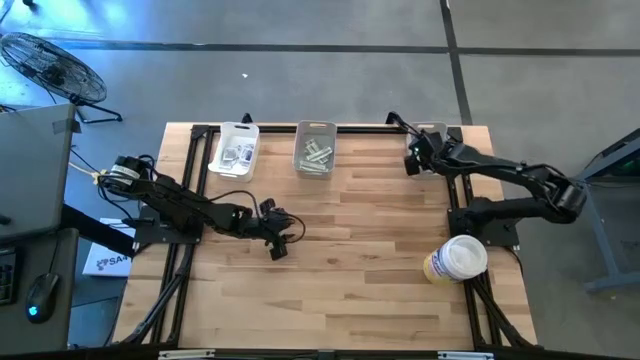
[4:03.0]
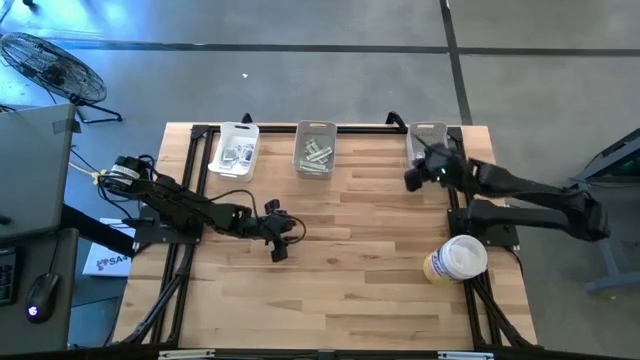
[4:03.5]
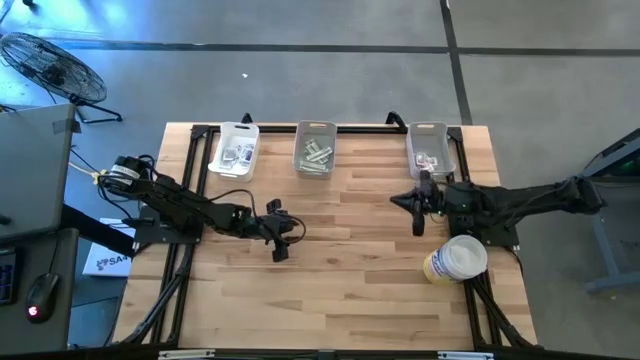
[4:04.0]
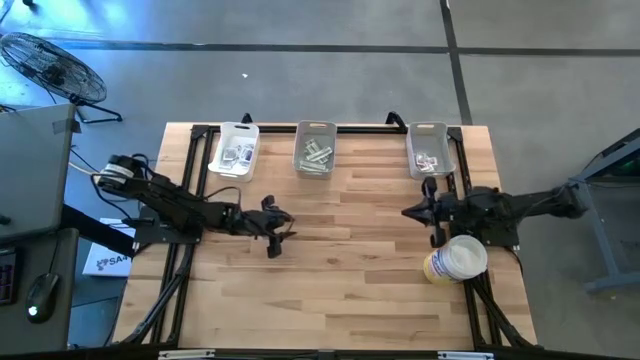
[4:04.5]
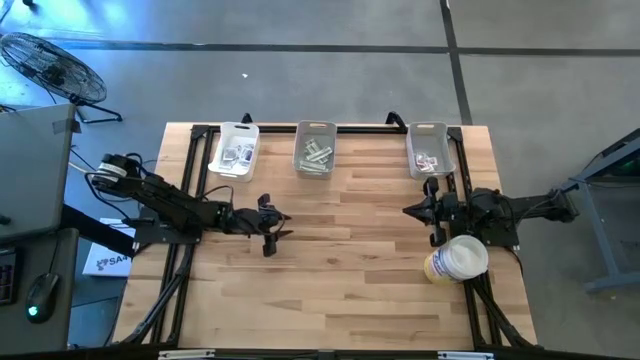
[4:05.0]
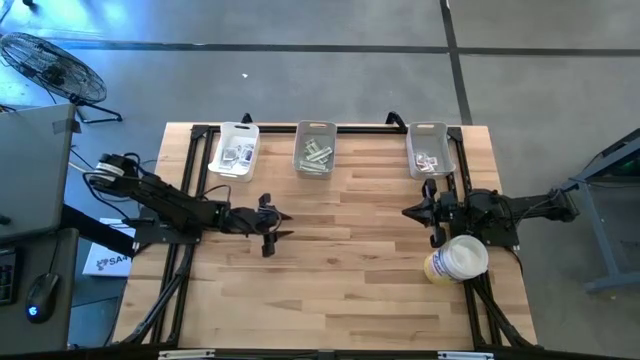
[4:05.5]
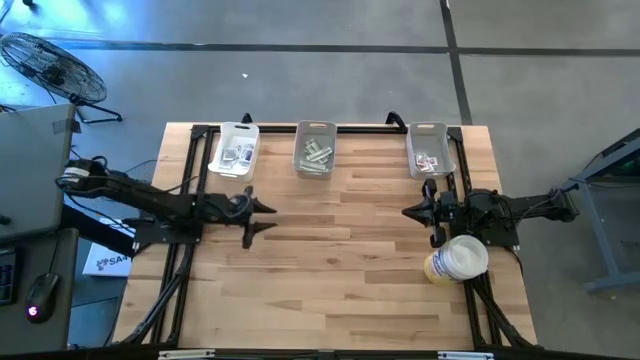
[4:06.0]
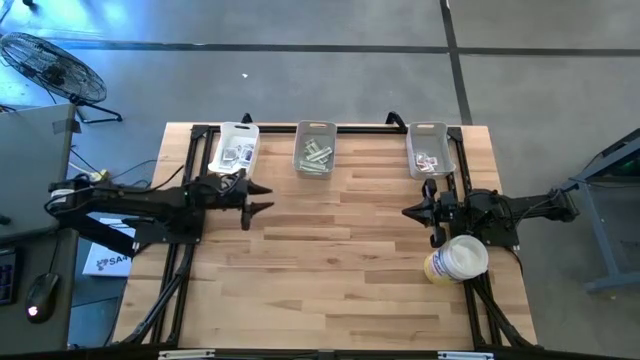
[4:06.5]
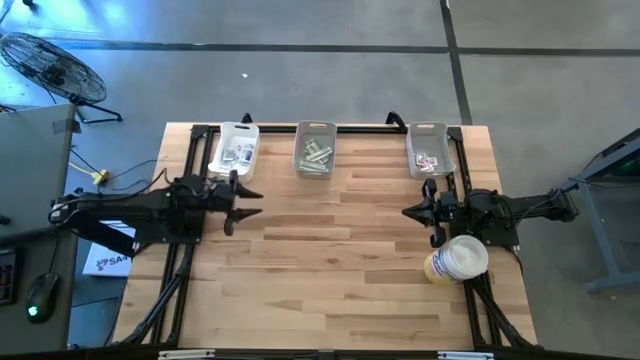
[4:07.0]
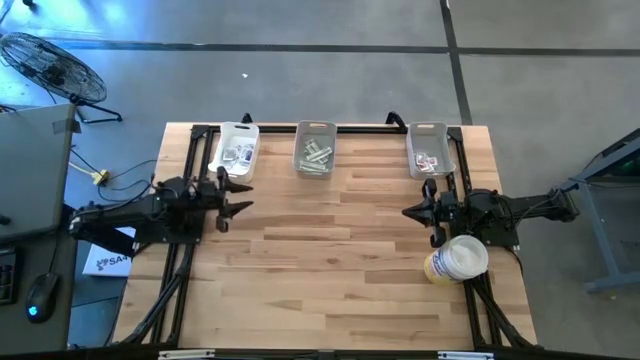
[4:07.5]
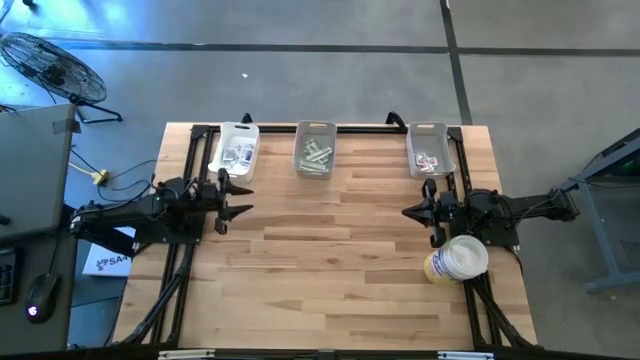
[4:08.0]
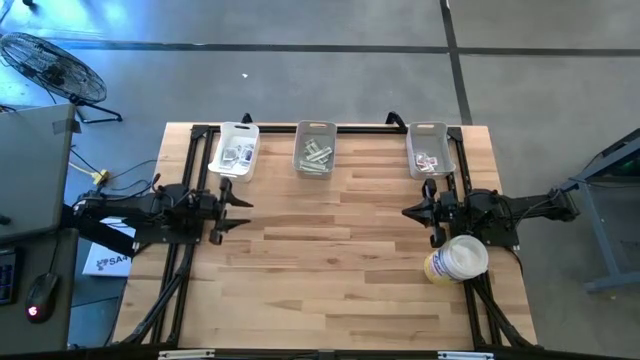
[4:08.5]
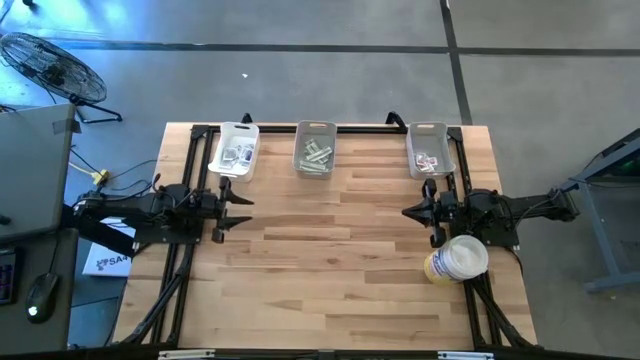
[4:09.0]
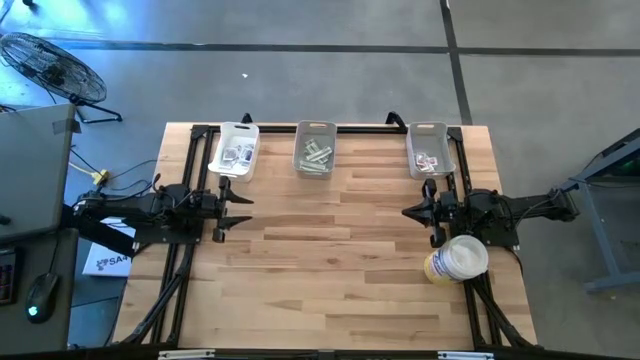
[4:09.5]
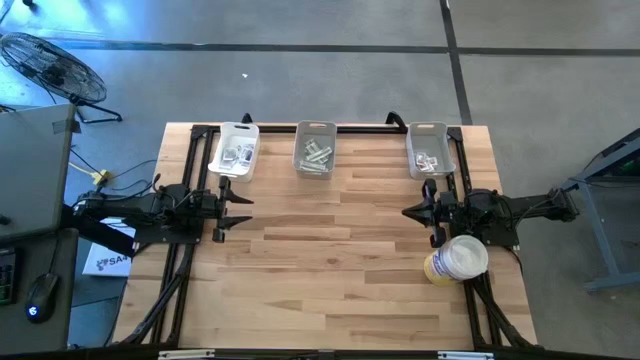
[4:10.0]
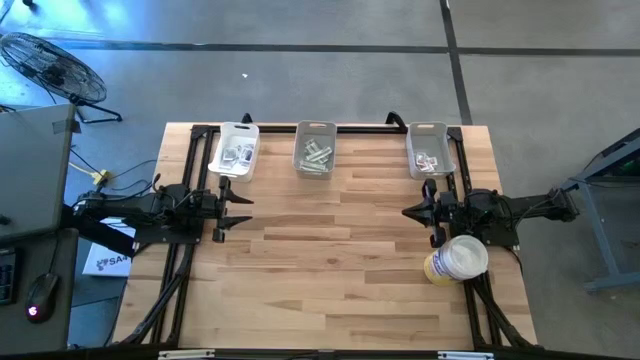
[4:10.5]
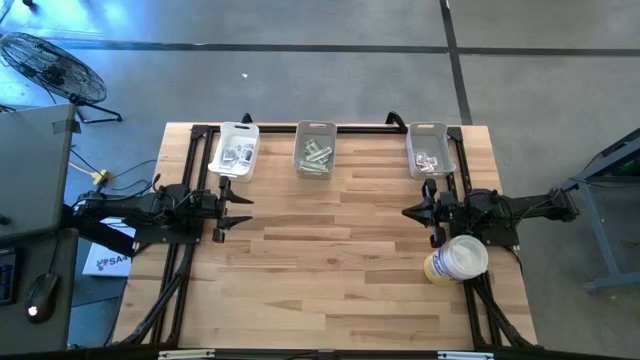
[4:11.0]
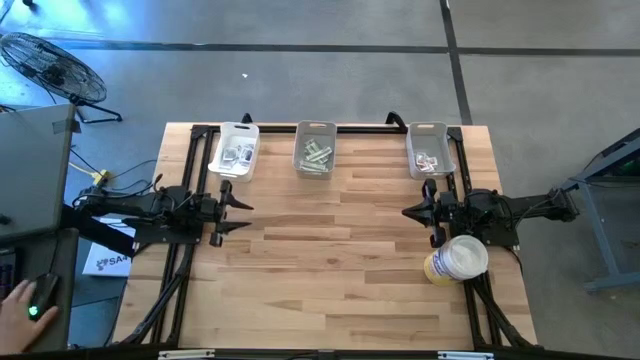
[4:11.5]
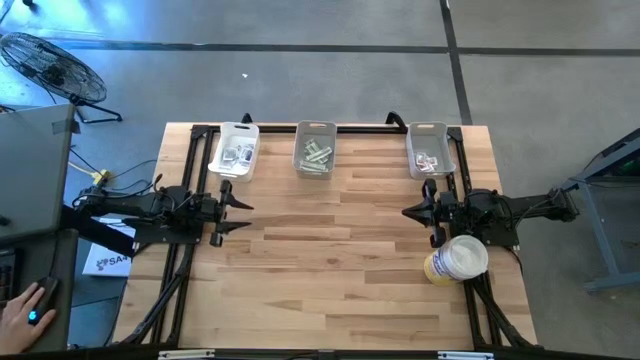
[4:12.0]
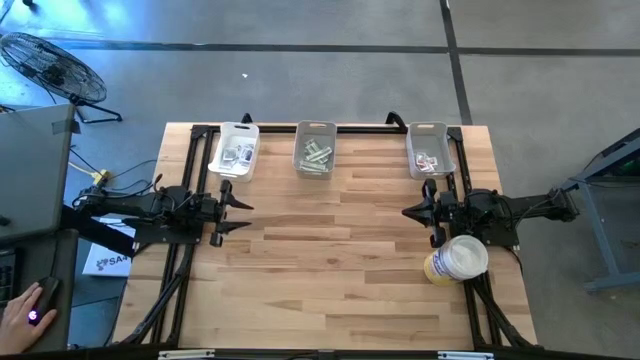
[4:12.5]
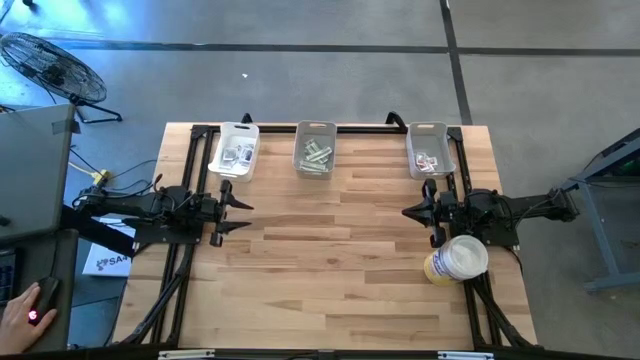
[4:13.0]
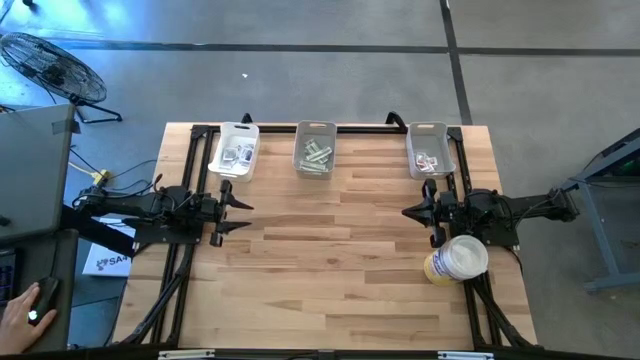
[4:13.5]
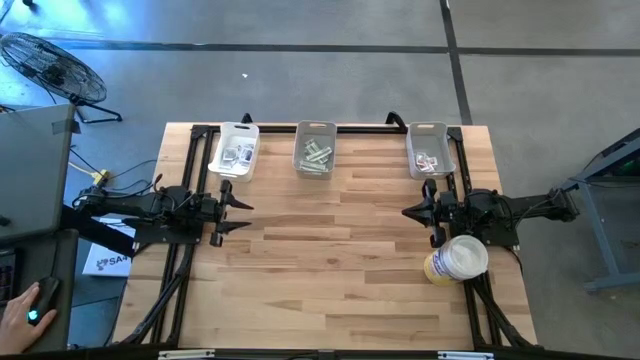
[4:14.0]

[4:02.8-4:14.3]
Task: Pick & Place First Aid Supplies
Return to Home Position

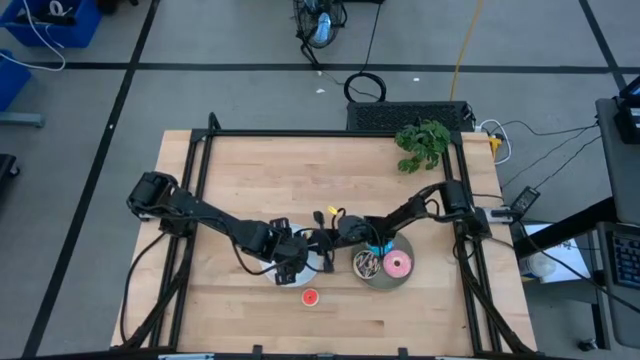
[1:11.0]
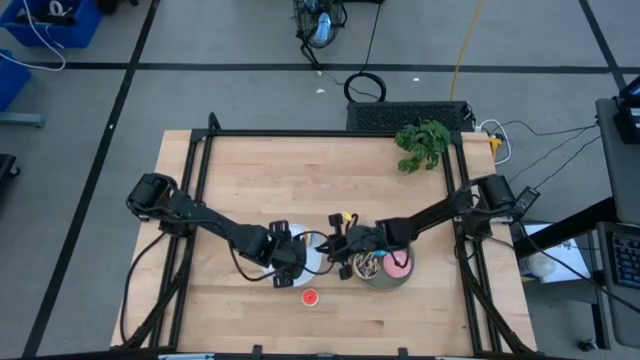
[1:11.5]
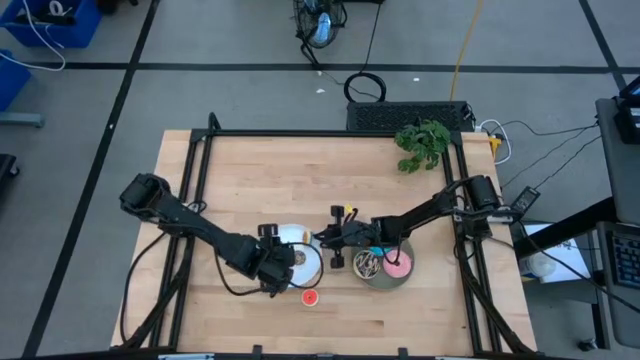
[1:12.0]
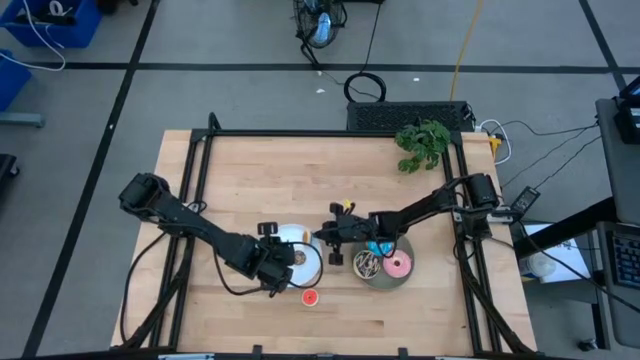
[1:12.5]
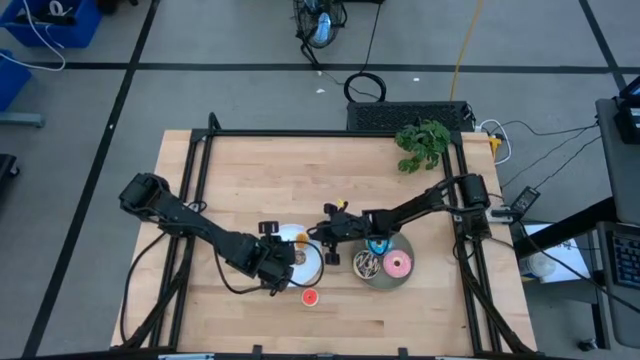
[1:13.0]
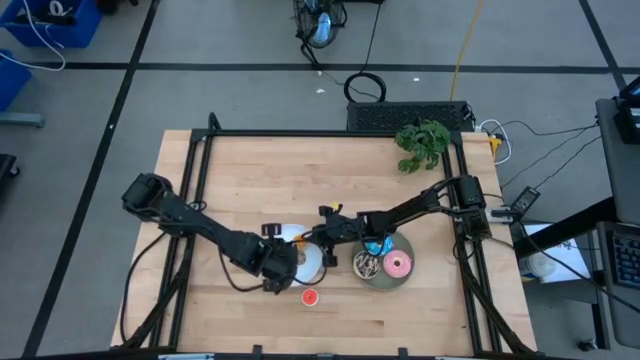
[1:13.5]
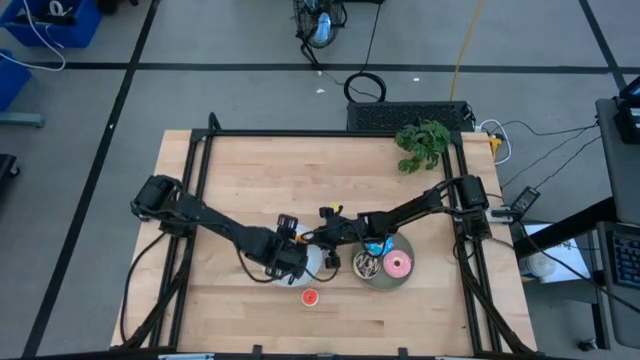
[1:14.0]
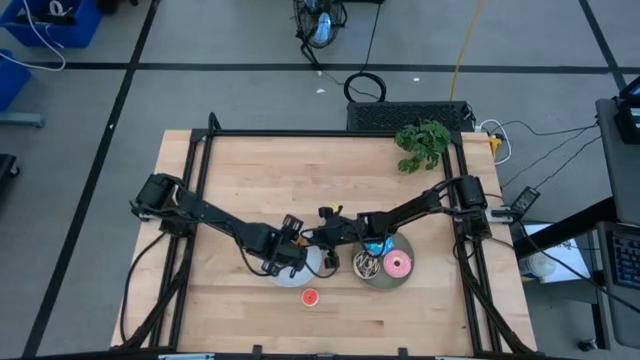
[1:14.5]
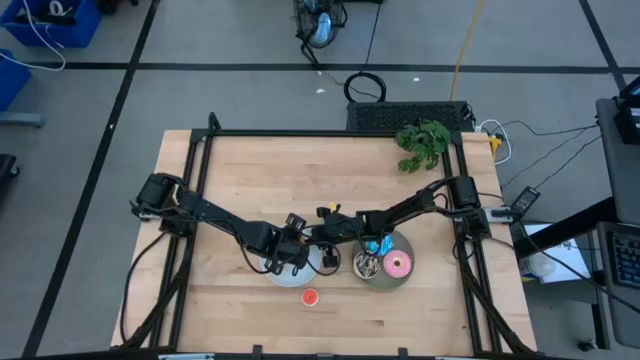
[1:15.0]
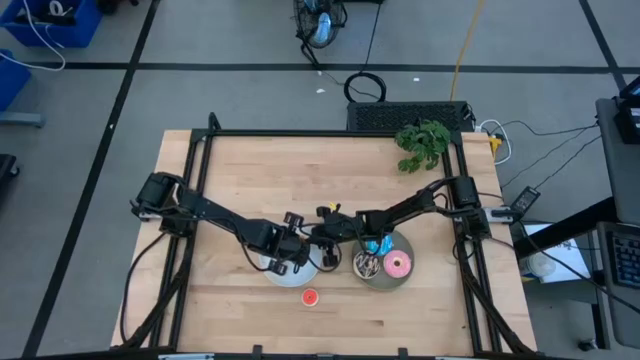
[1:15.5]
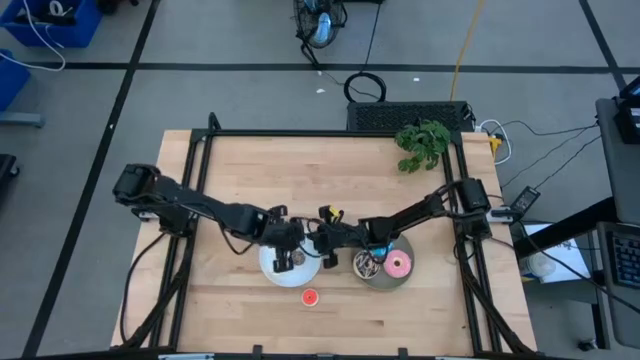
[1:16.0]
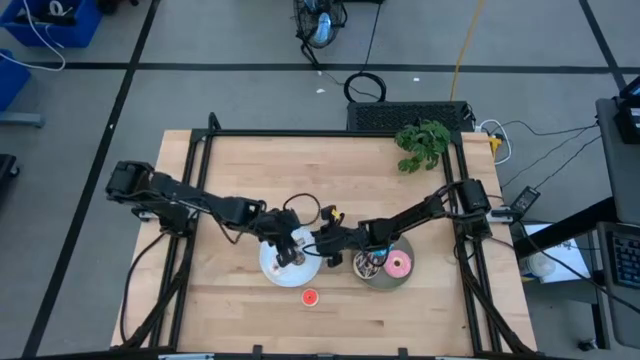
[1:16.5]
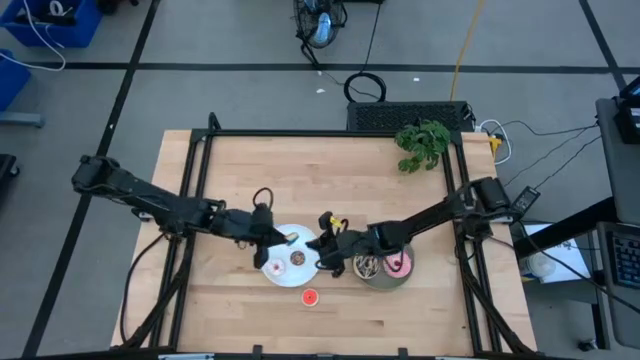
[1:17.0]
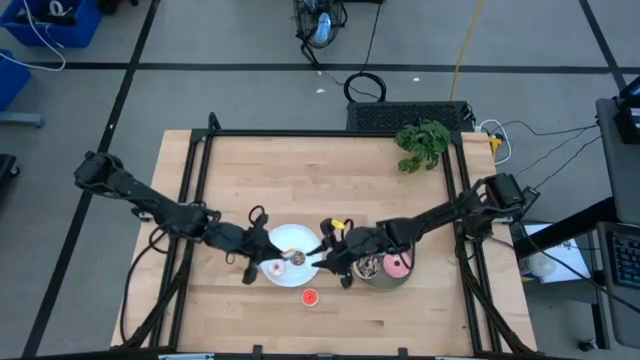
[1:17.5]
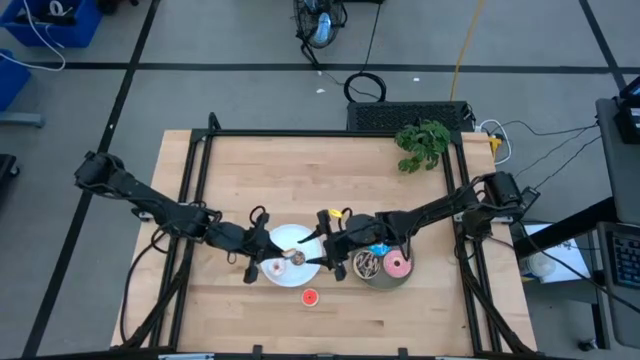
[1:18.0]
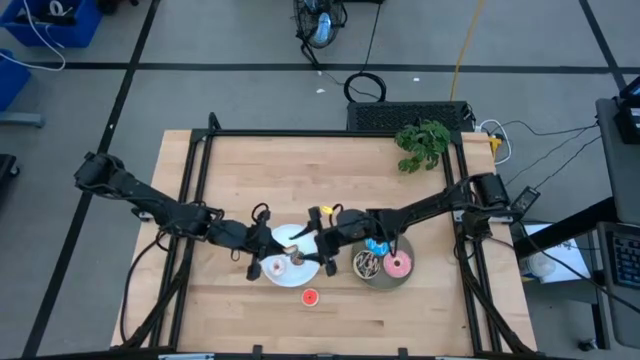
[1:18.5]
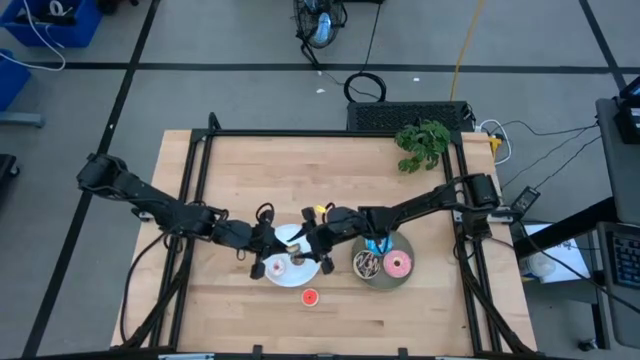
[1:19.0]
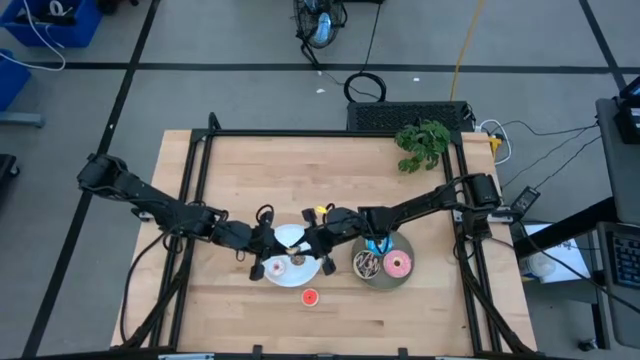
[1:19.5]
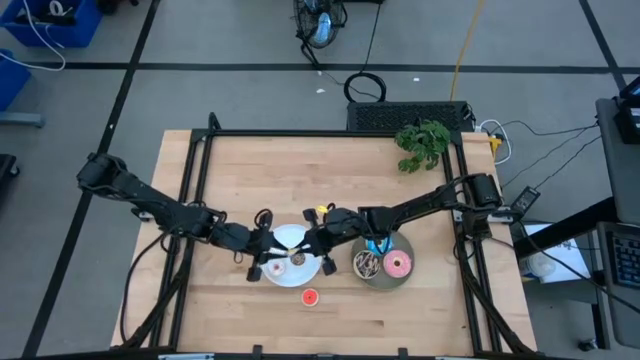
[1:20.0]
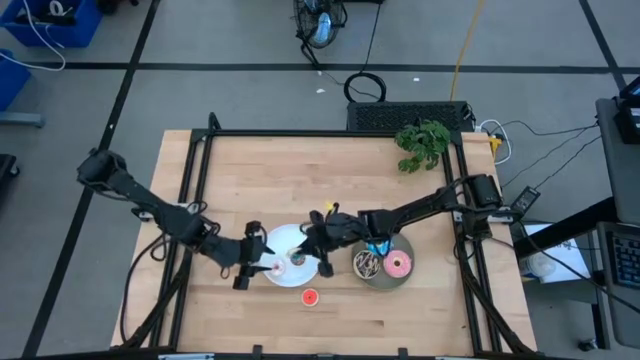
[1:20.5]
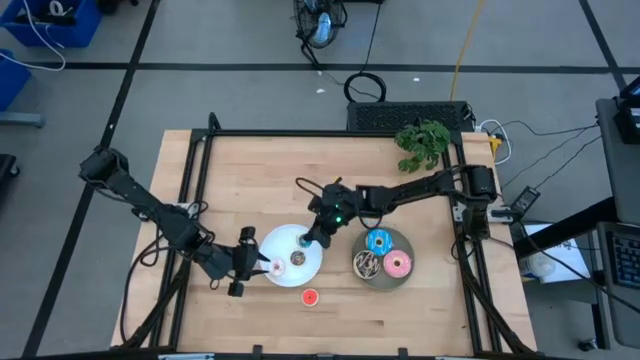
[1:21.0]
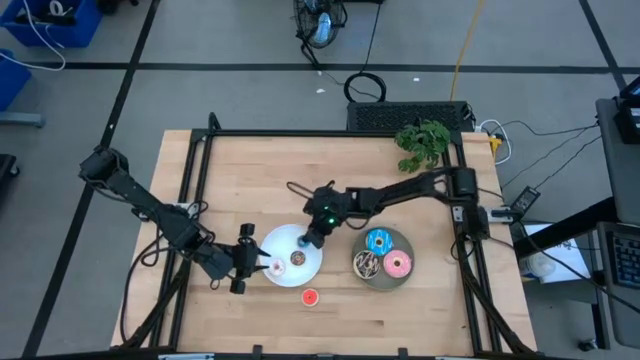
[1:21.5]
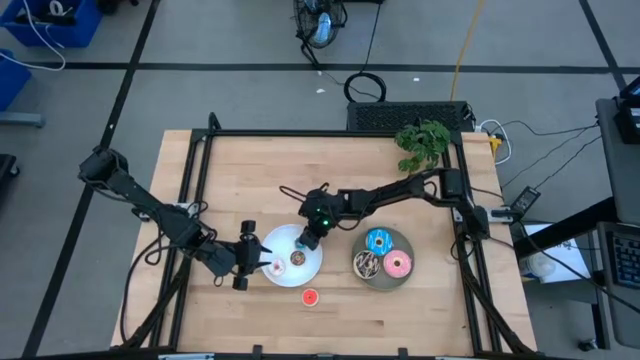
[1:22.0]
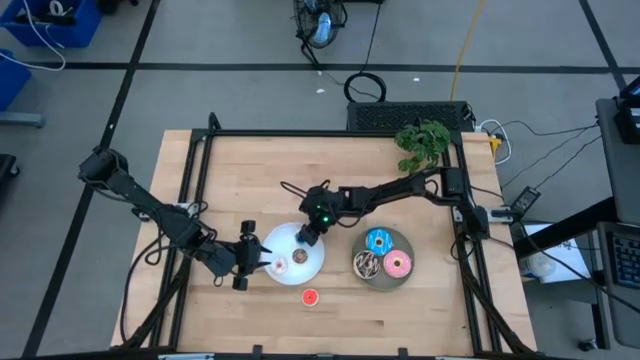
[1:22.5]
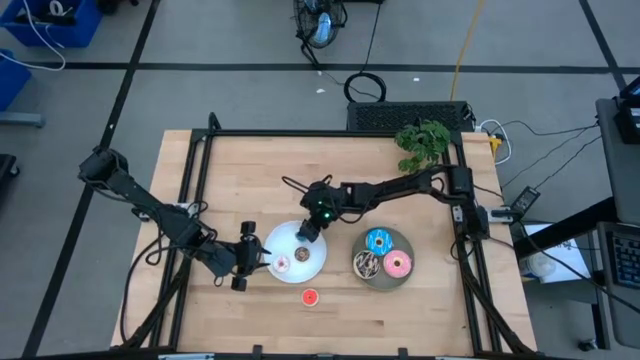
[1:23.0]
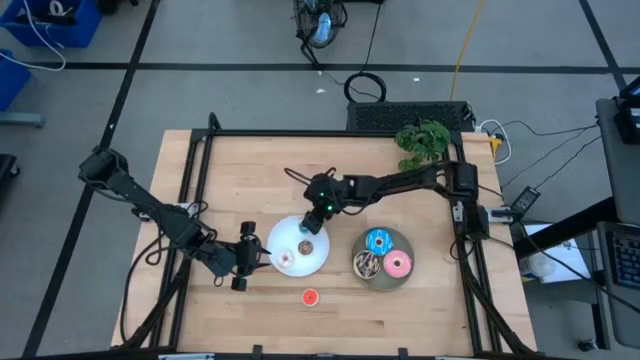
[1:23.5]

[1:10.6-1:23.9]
Task: Pick & Place donuts
Put the small blue donut on the white plate
